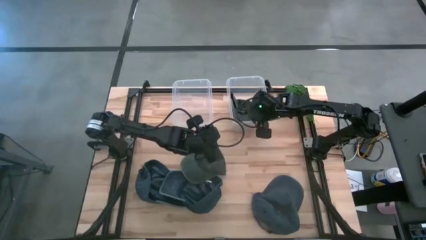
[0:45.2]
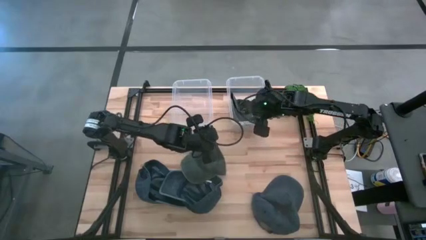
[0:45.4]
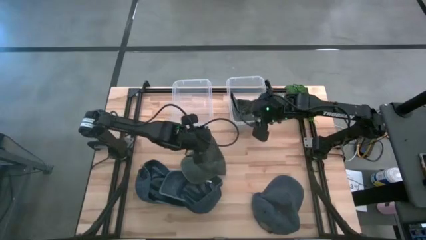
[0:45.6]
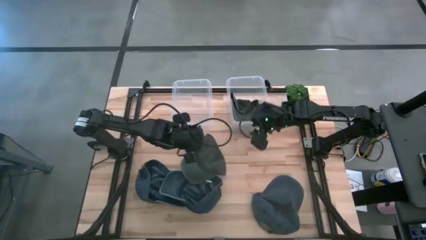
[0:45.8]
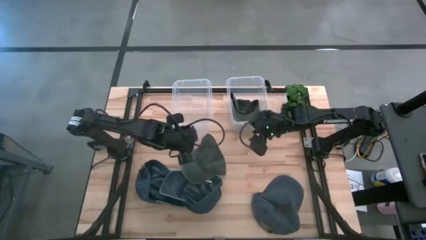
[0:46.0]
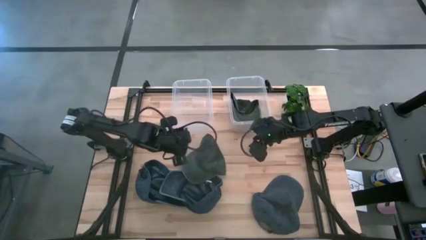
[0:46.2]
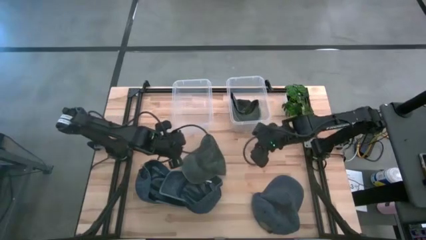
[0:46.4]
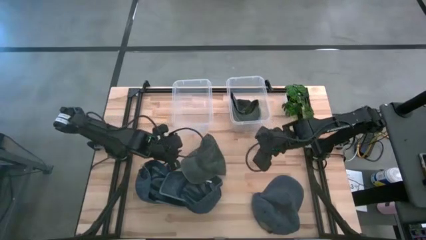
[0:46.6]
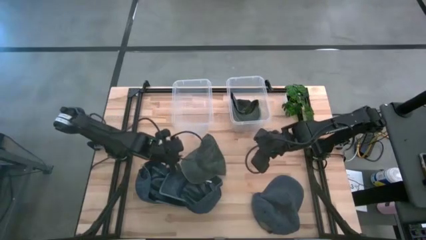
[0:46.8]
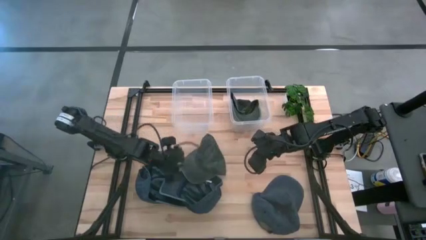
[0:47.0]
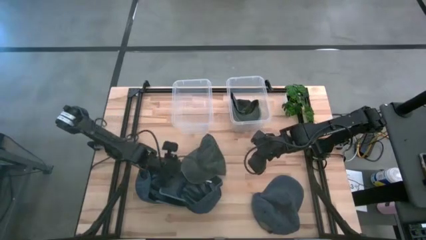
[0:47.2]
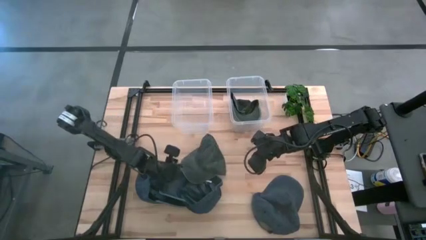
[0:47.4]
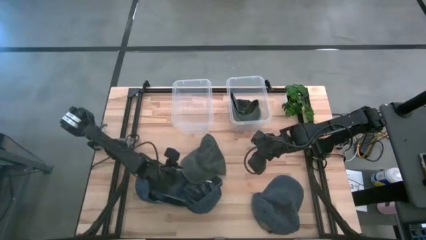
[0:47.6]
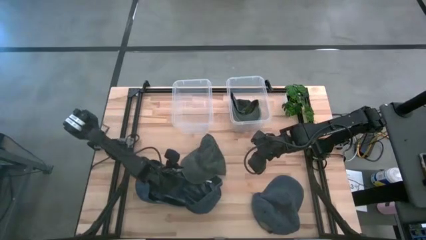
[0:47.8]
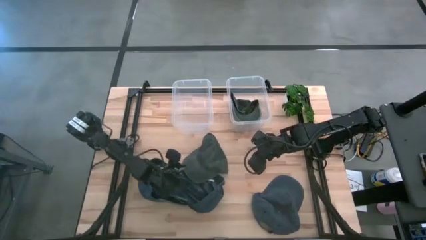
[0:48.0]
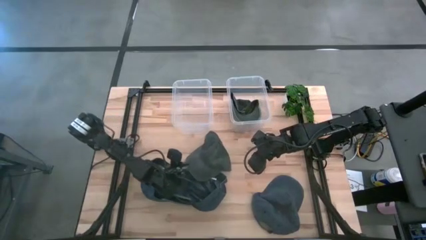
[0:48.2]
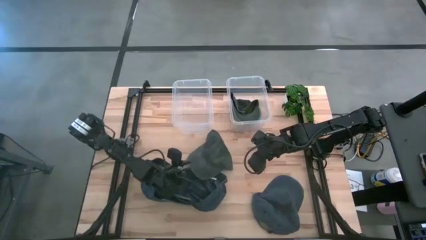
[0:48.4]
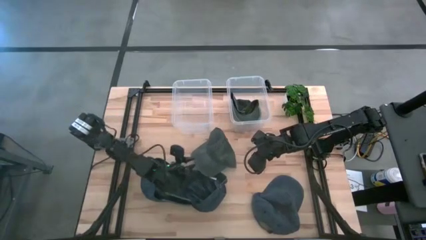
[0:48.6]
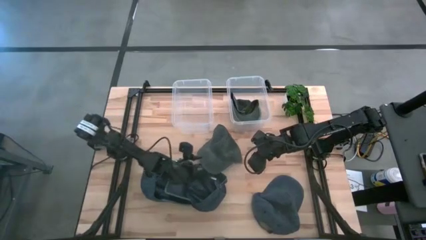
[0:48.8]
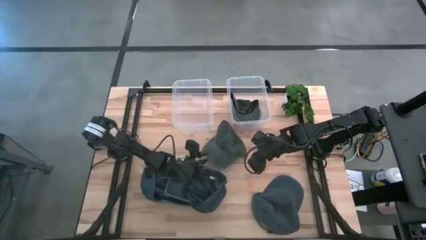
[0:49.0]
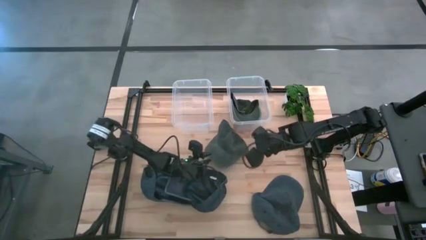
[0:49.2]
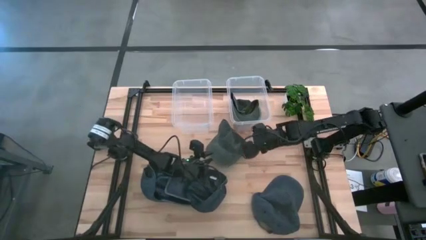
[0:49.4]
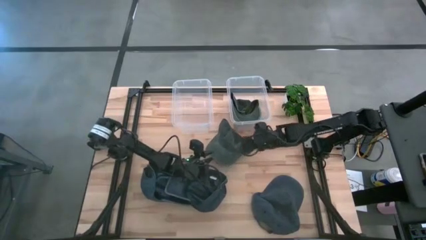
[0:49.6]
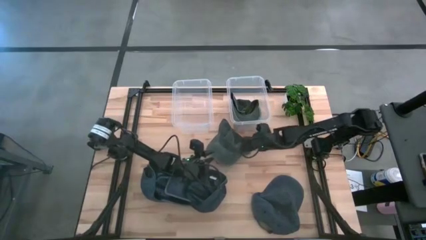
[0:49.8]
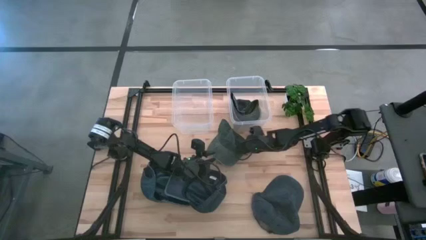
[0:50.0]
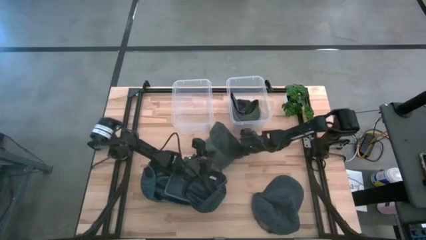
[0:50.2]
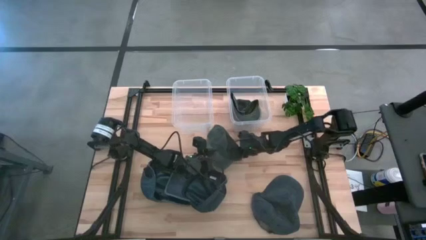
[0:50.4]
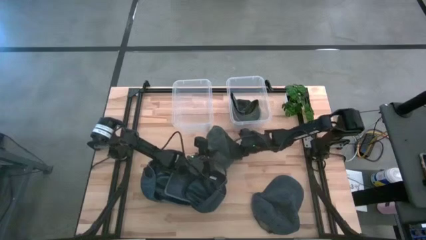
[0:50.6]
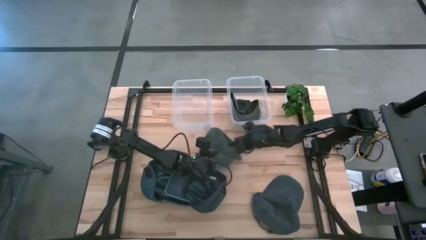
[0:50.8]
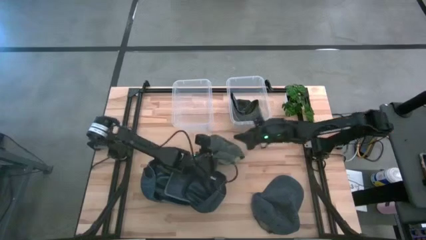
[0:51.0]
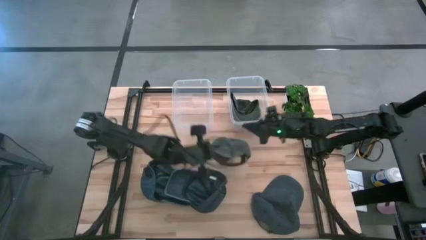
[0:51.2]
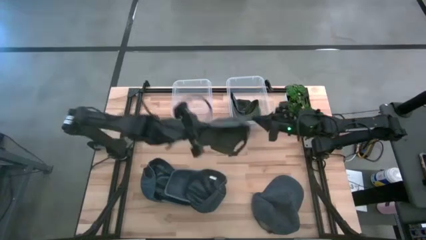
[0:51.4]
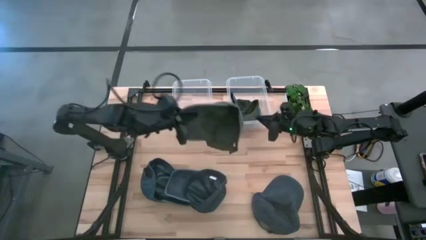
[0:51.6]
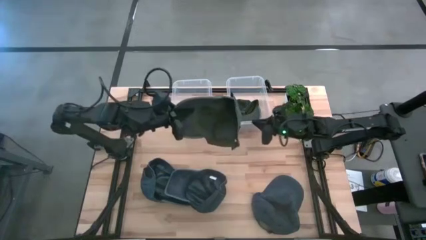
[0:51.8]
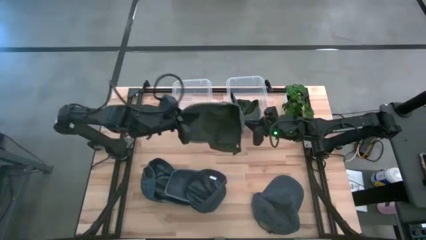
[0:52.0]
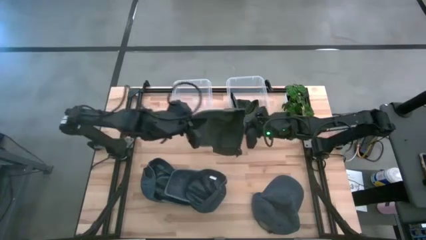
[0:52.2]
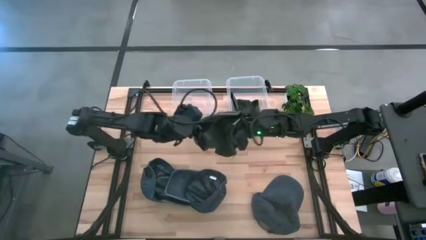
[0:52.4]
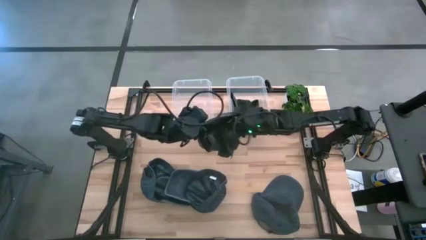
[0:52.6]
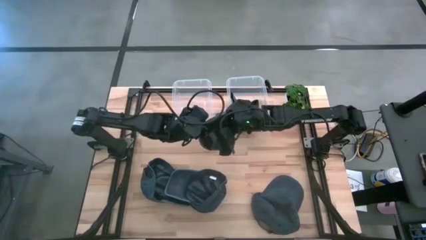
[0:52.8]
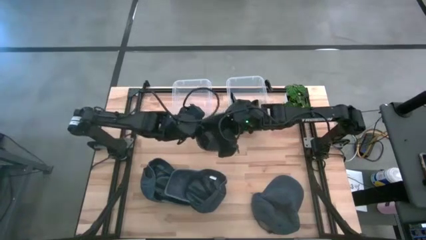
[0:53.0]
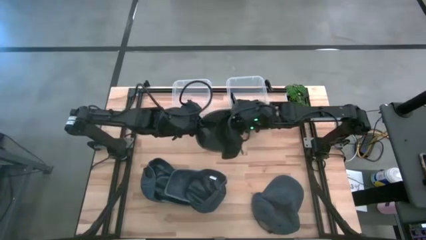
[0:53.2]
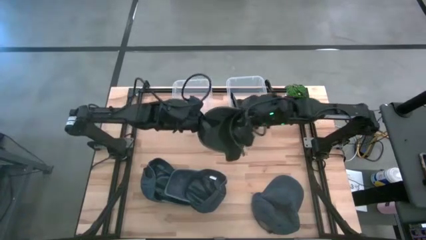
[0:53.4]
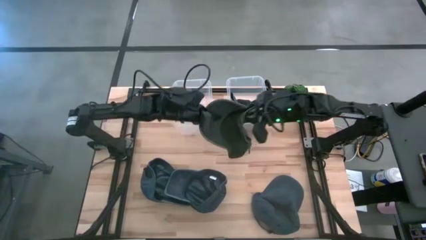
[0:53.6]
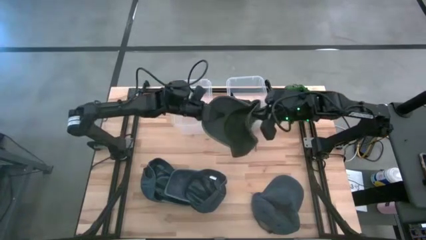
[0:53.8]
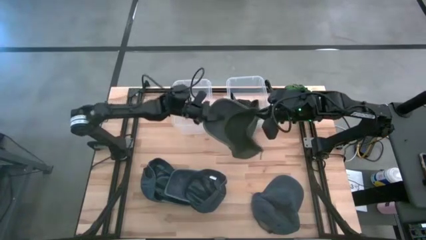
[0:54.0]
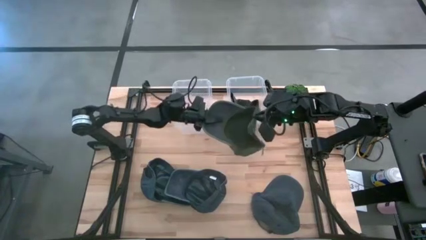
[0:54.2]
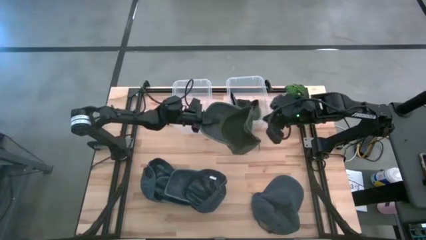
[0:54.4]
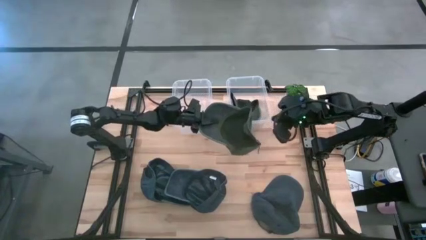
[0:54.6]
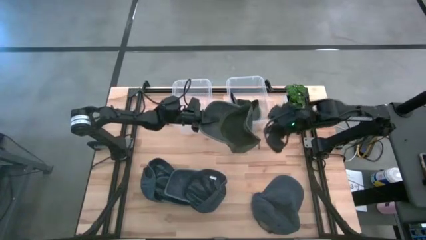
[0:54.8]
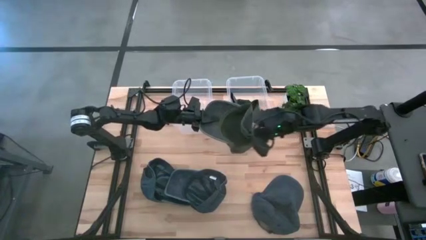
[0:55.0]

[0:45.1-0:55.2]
Task: Pick & Place hat
Put the gray cap into the right bin

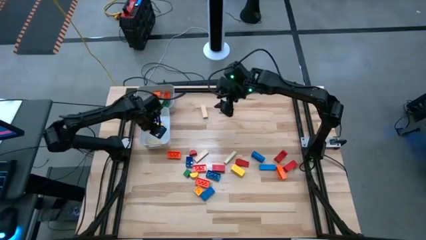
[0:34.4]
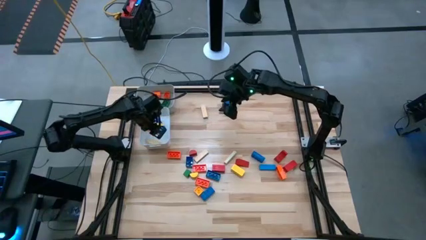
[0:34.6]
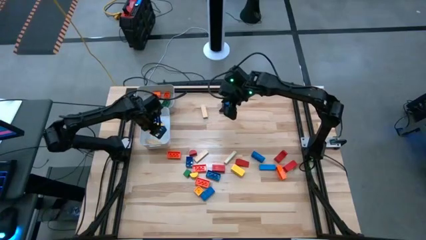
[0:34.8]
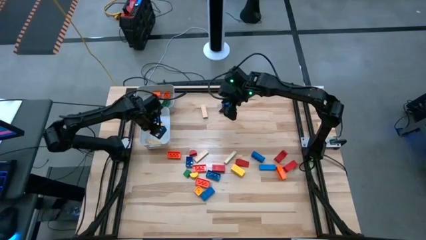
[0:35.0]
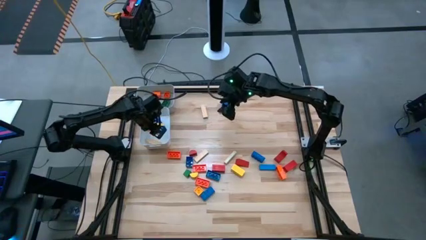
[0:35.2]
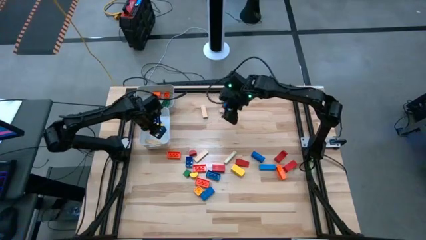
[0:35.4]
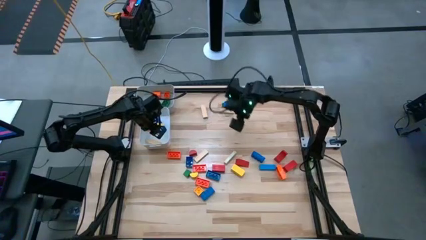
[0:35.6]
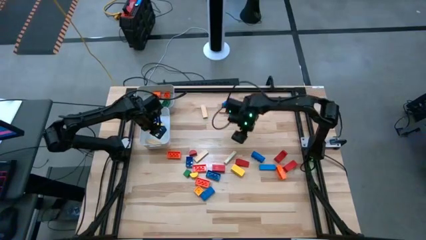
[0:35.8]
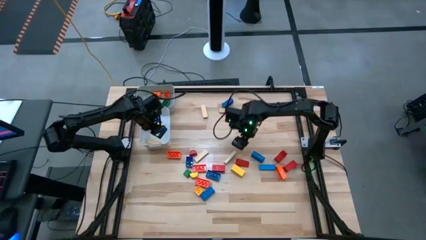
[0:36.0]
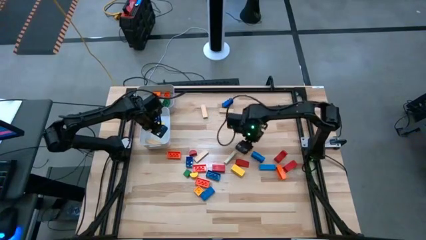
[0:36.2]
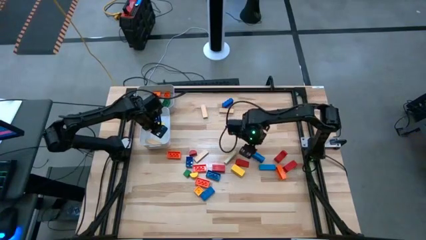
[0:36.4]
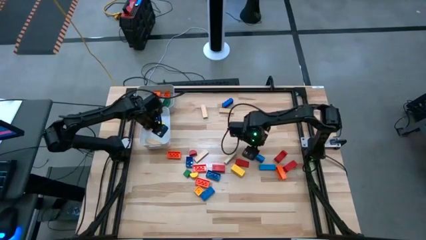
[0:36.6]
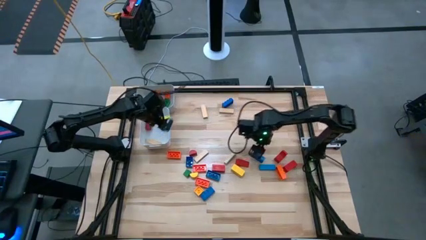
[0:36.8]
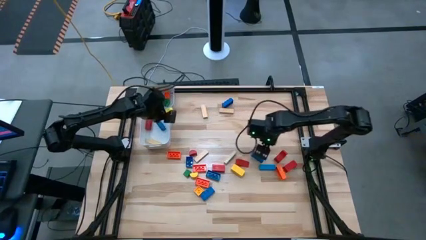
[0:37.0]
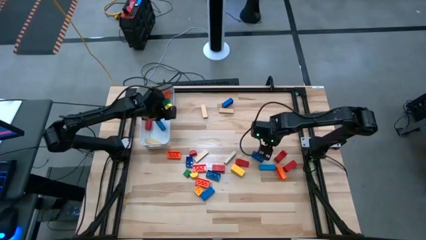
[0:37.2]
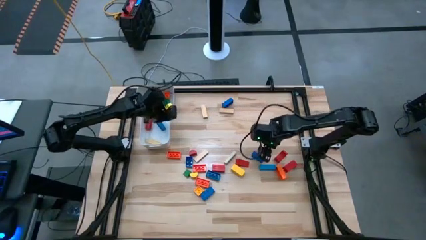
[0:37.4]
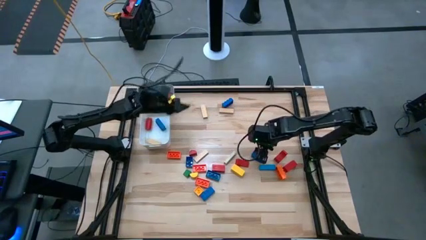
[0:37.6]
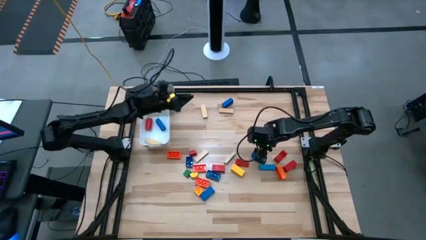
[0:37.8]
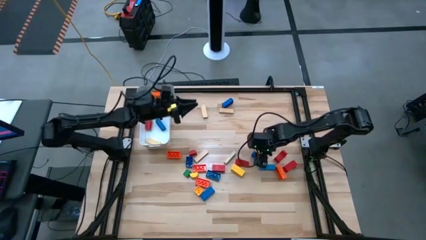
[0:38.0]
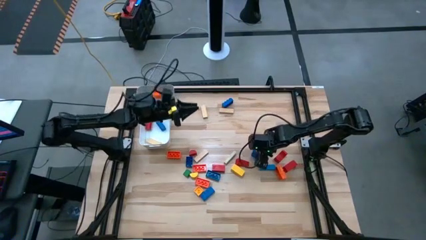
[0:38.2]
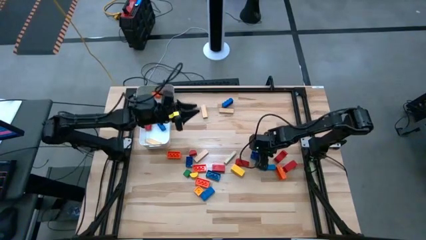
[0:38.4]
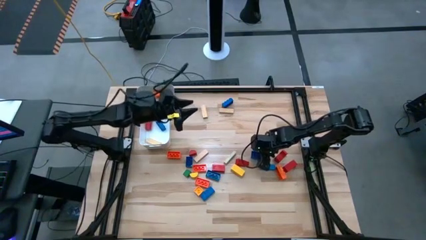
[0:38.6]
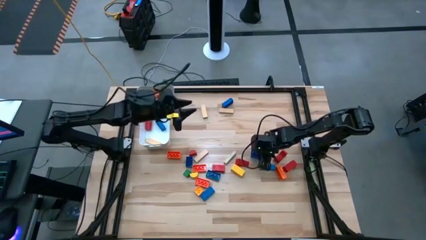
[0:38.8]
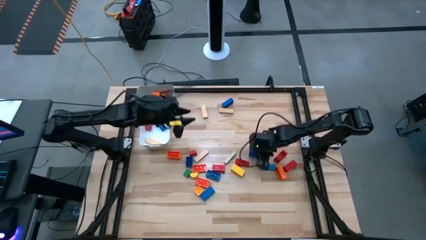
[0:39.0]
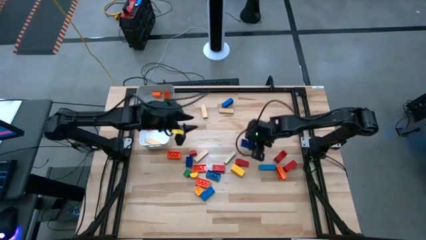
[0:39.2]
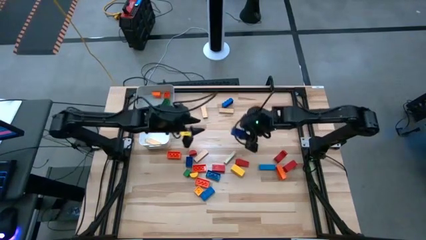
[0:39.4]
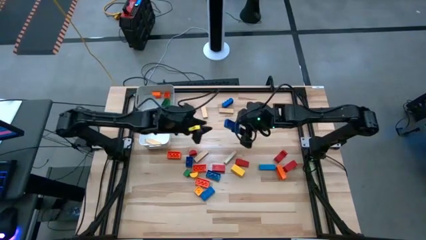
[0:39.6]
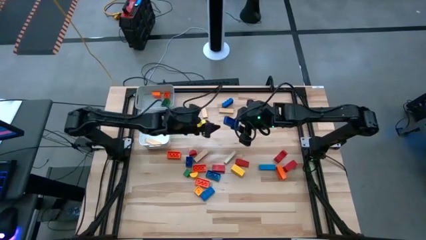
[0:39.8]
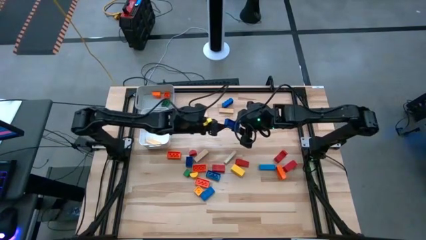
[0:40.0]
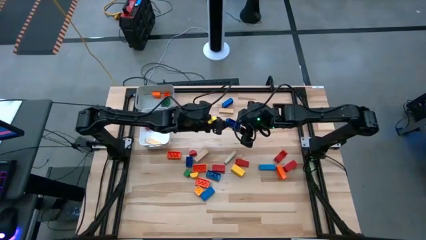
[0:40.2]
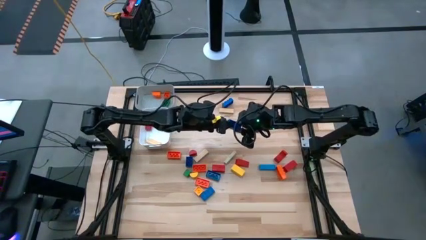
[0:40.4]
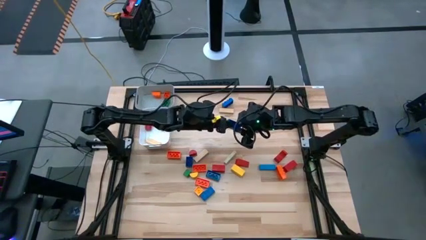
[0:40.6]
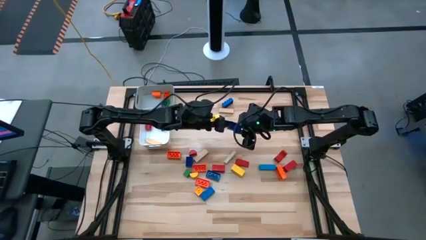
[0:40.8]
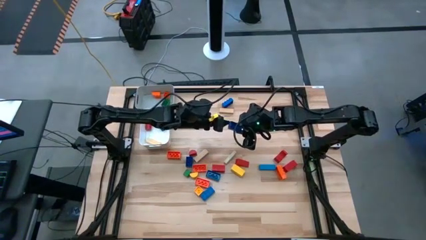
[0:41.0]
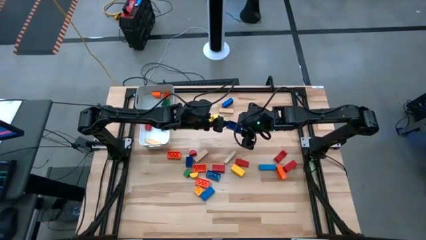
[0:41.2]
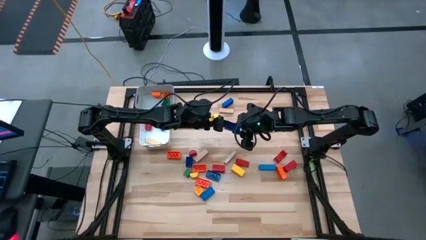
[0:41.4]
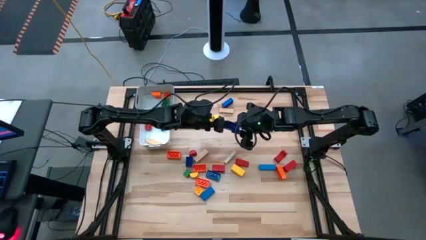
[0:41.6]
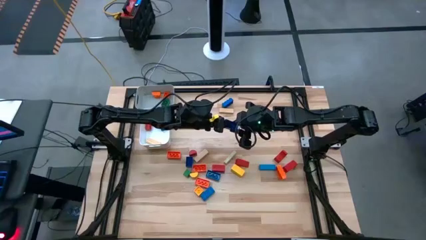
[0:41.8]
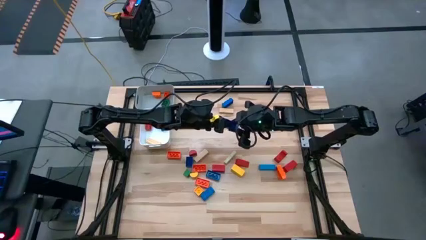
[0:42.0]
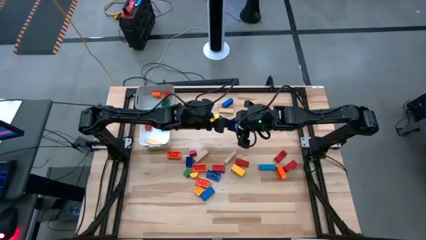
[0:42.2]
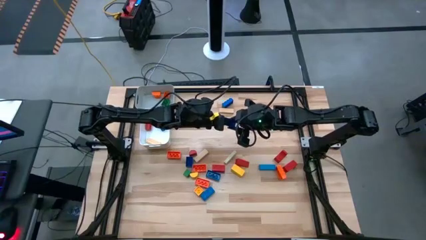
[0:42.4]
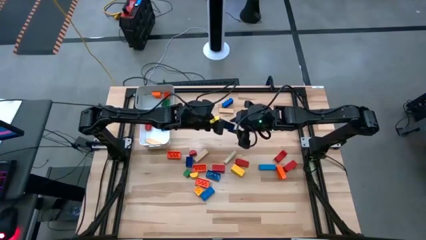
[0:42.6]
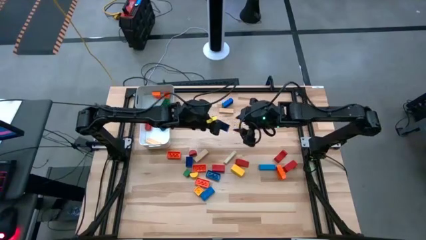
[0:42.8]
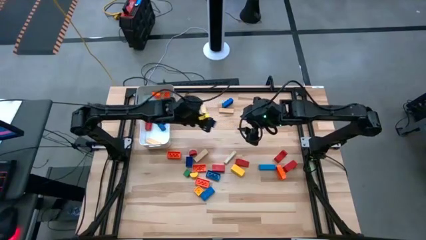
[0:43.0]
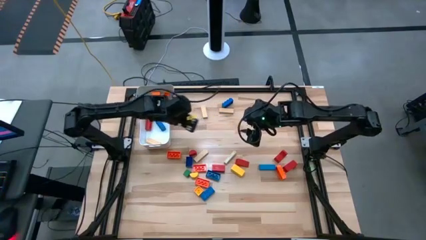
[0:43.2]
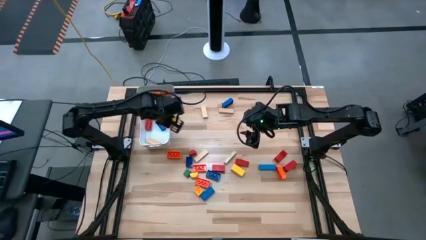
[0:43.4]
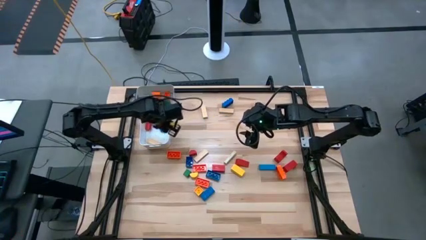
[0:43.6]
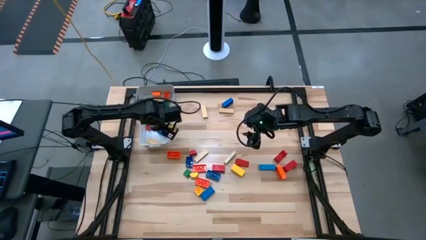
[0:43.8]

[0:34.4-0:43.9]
Task: Sort blocks by size
Put the large blue game piece into the white bin
